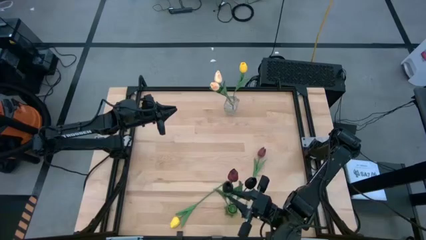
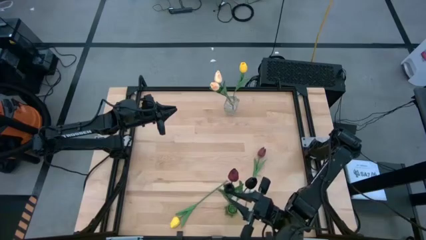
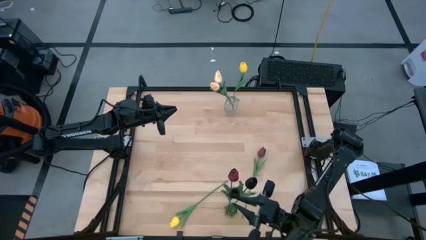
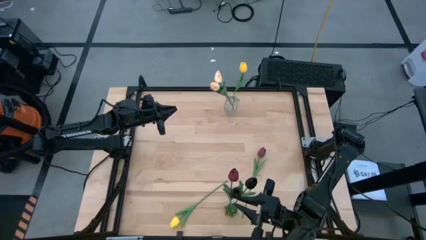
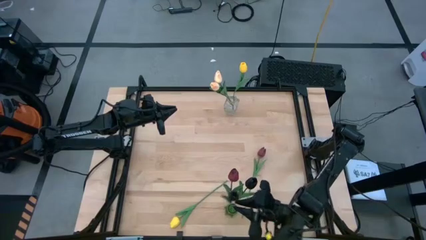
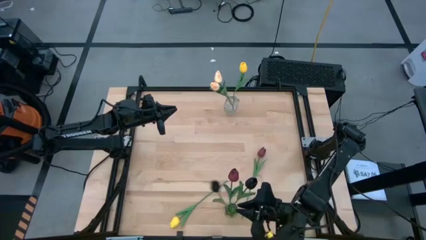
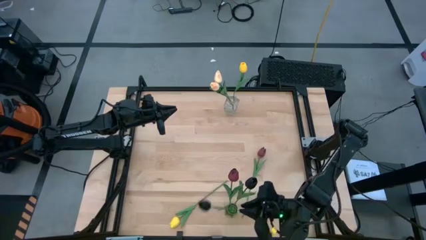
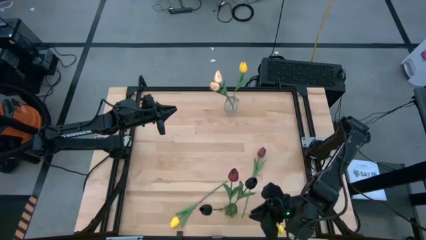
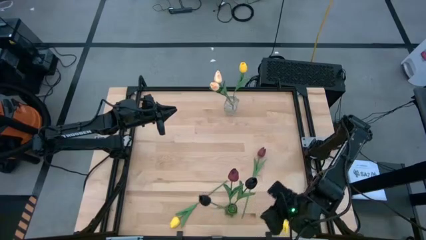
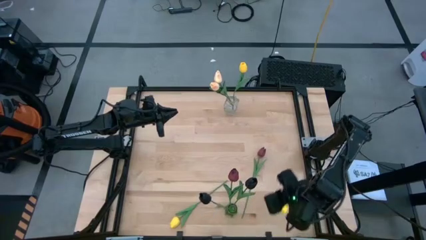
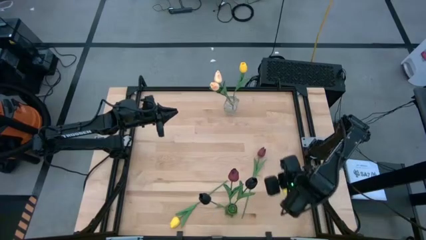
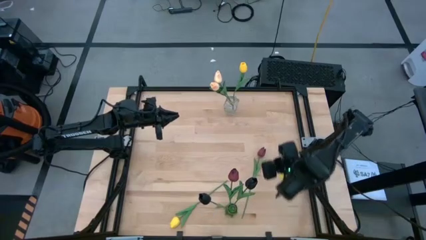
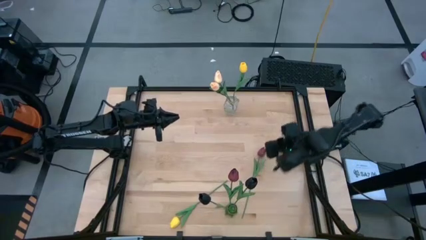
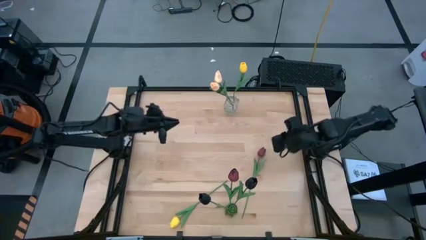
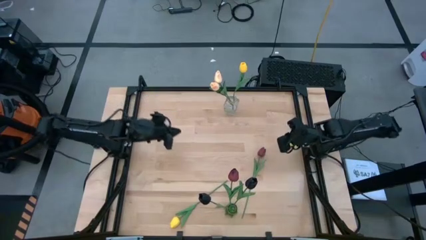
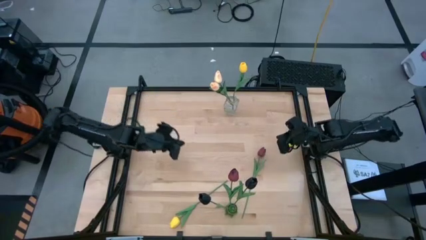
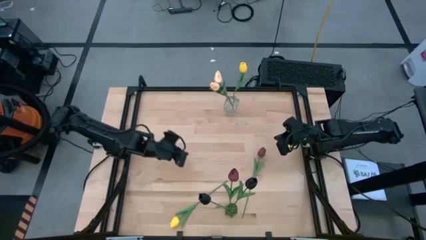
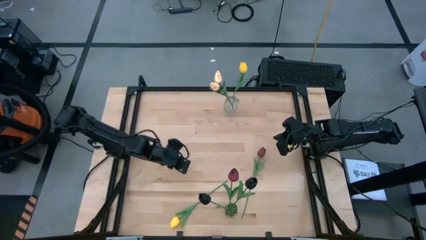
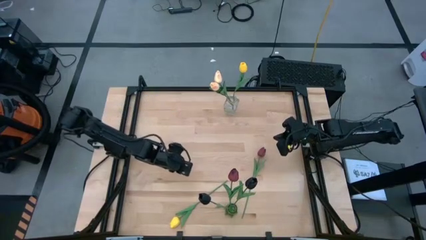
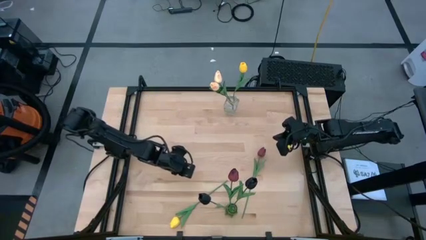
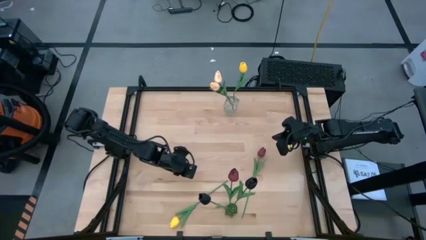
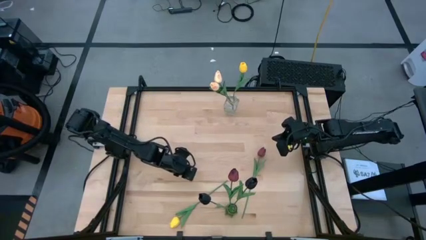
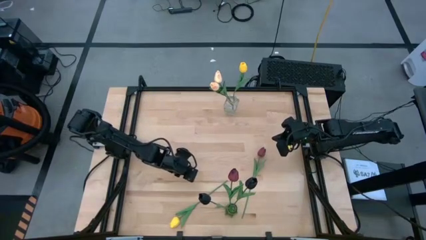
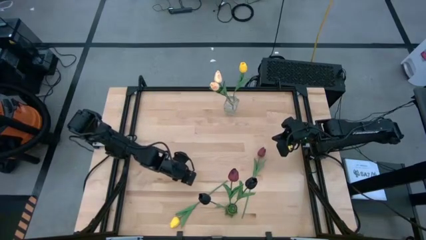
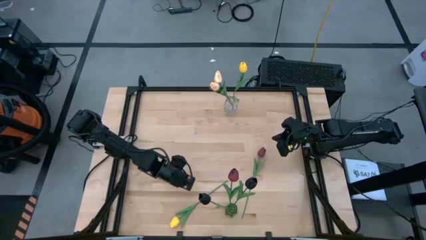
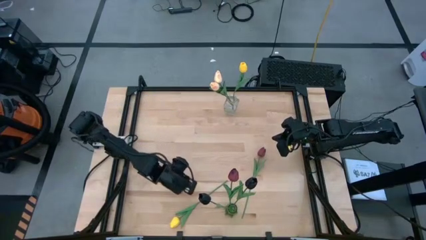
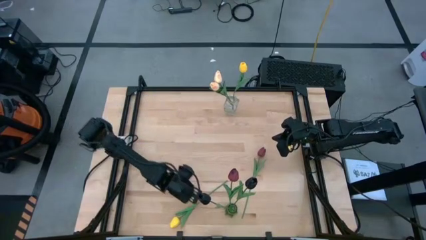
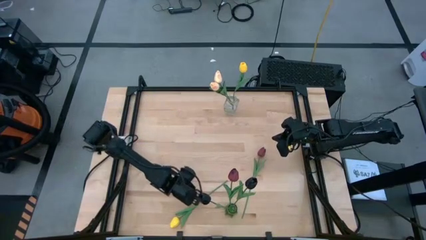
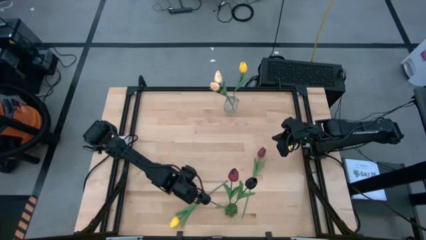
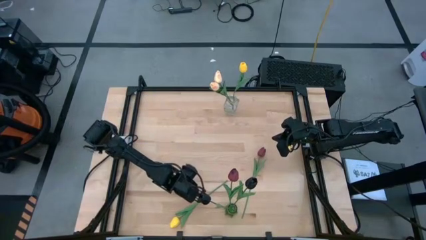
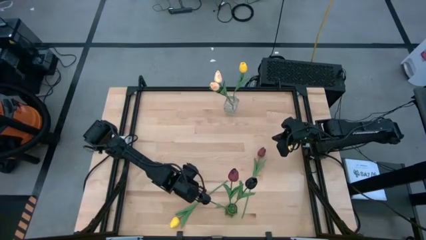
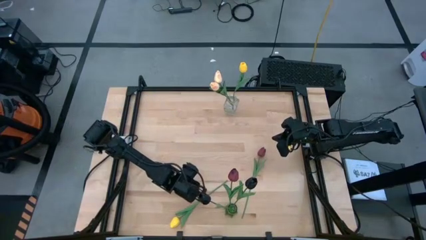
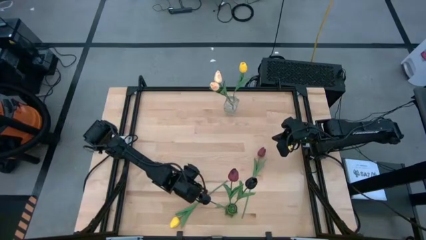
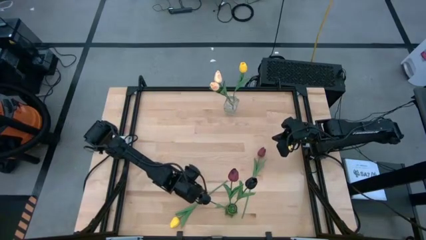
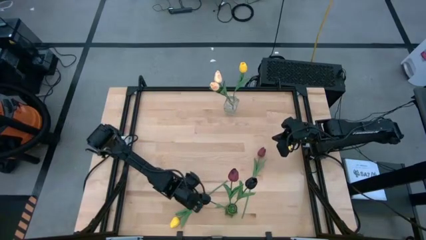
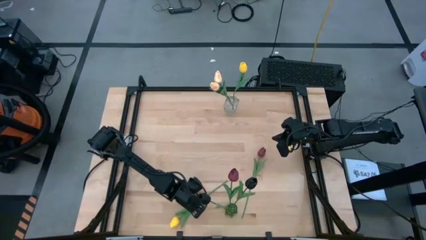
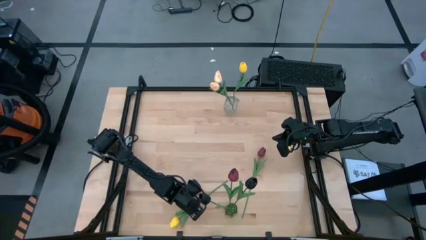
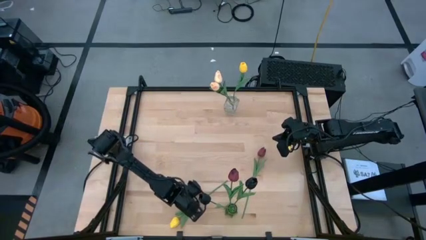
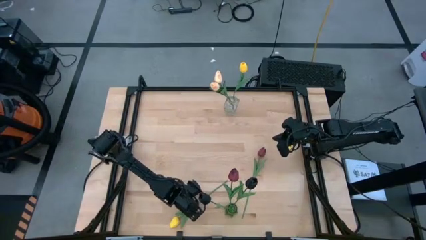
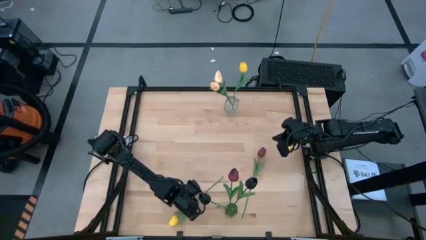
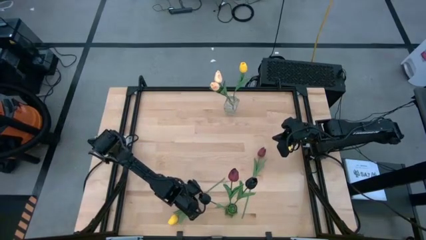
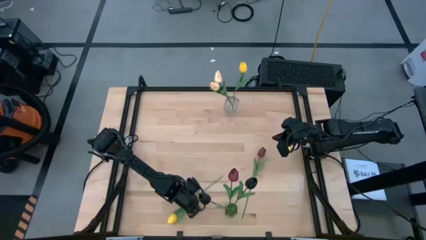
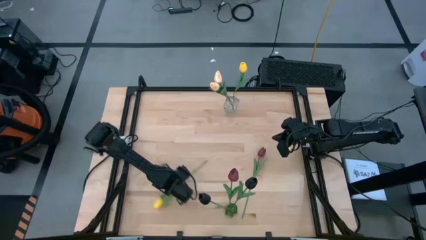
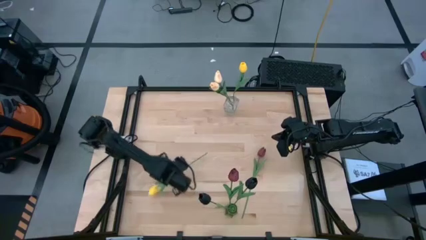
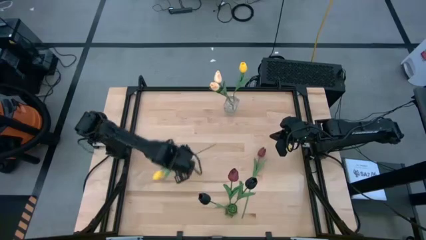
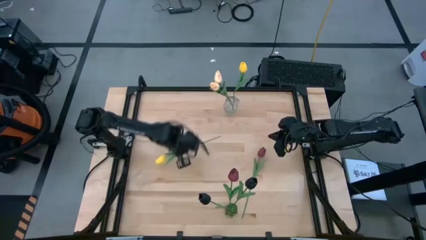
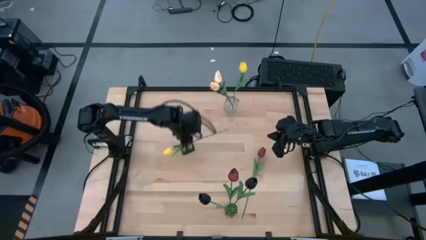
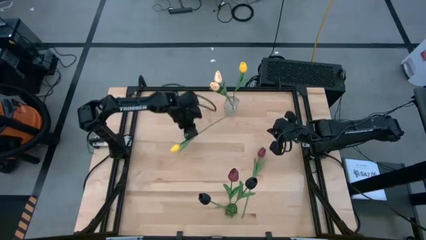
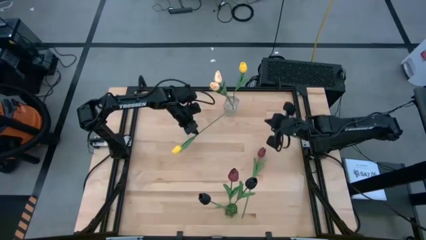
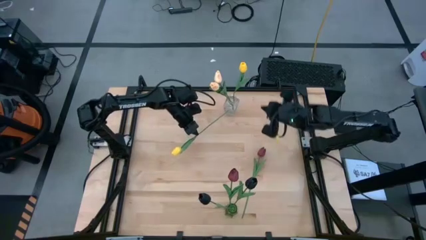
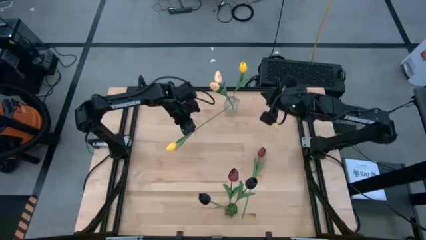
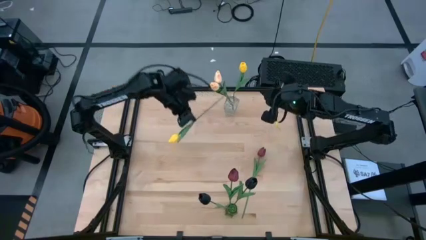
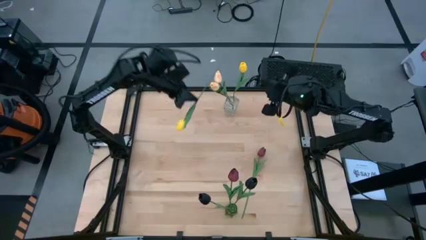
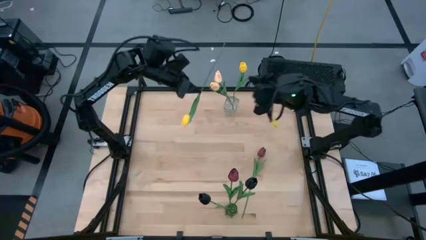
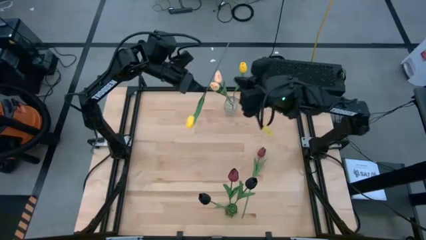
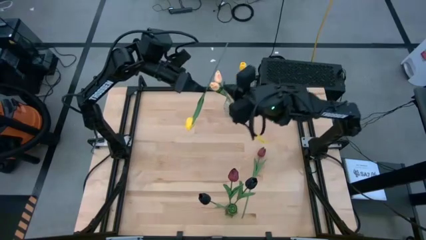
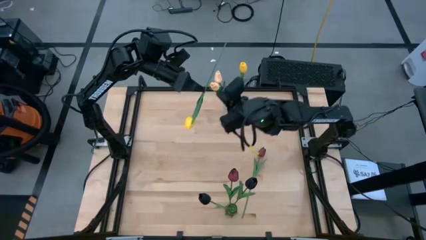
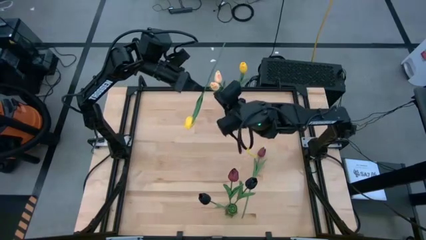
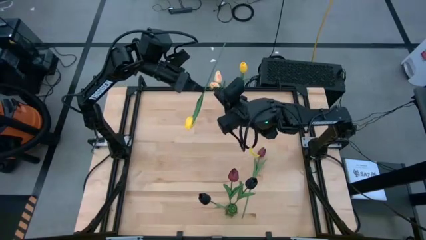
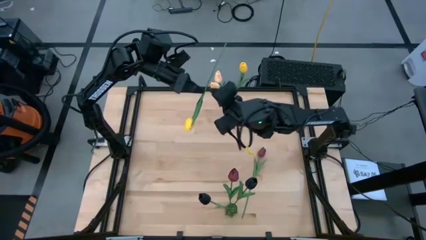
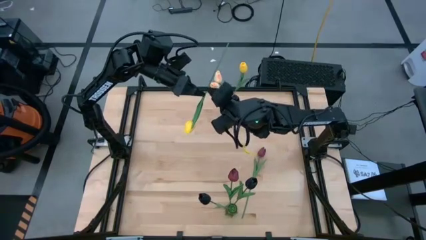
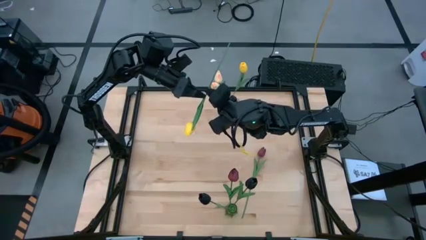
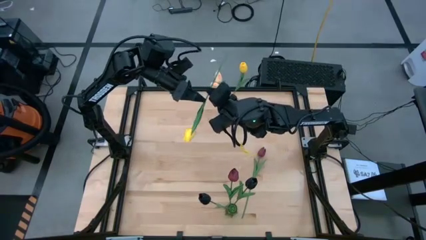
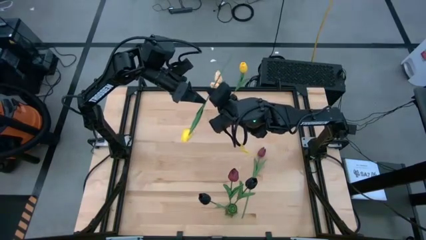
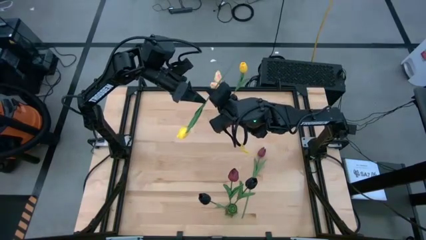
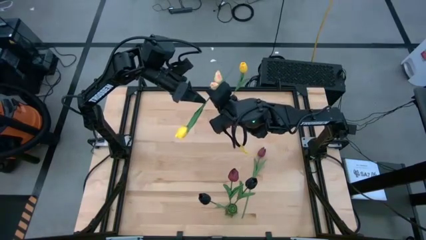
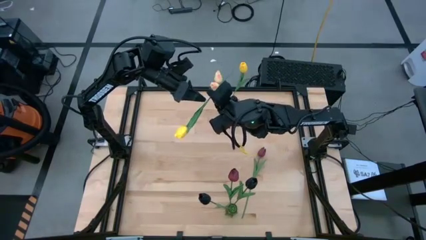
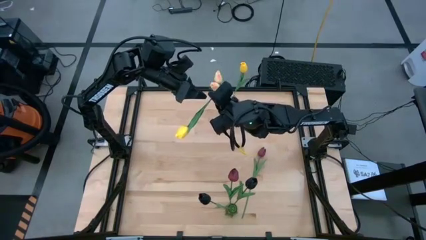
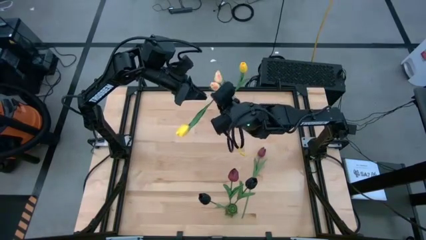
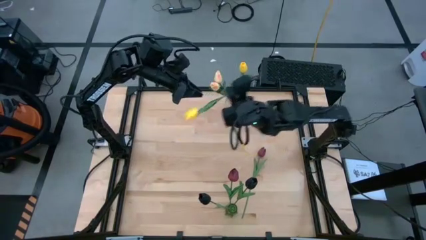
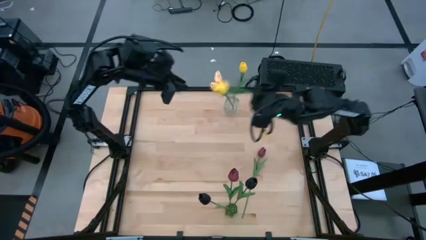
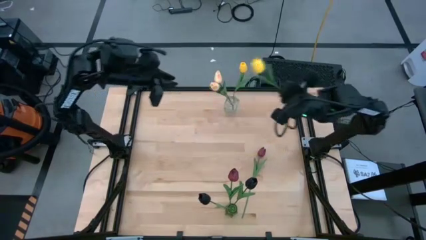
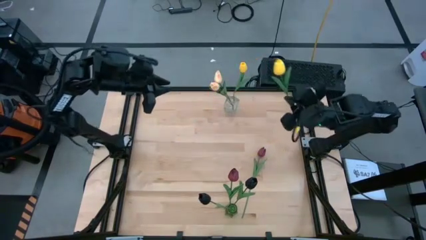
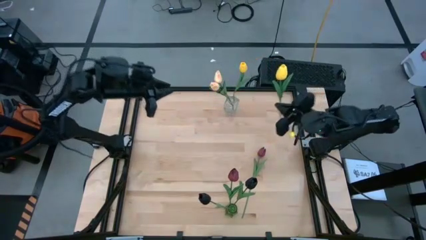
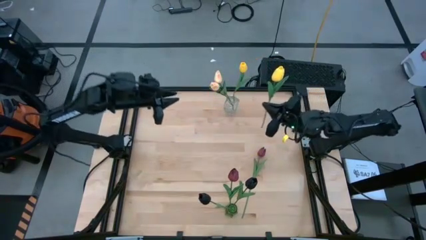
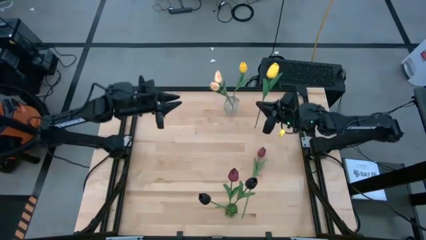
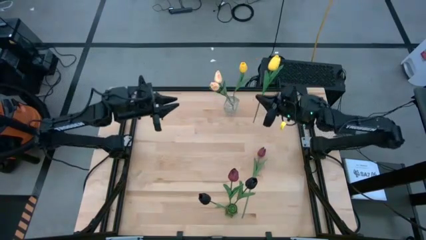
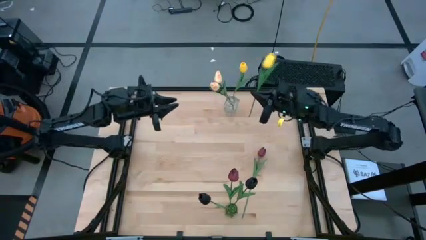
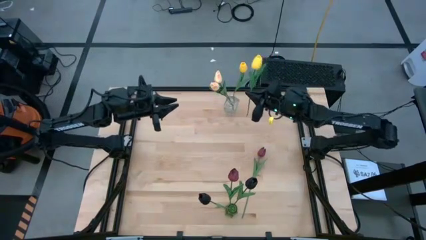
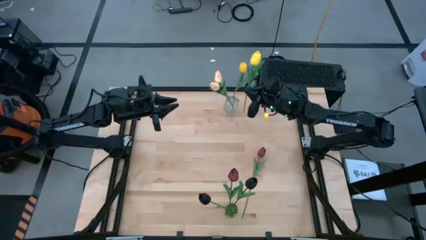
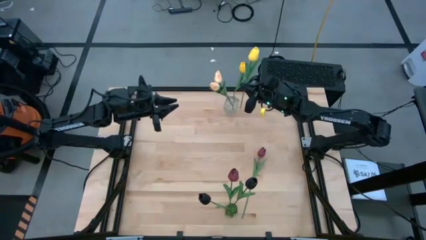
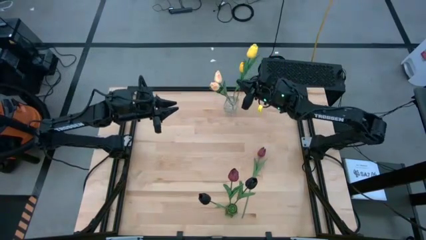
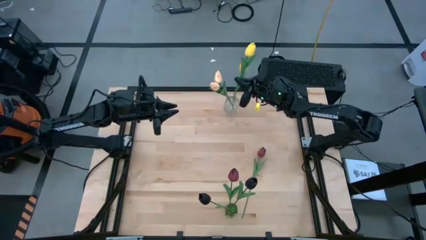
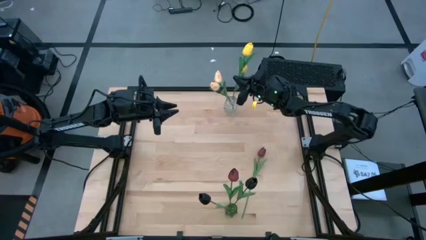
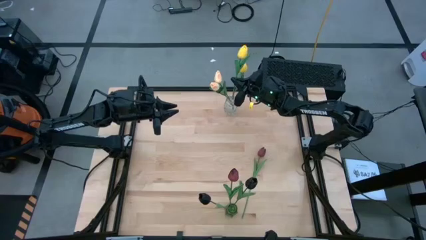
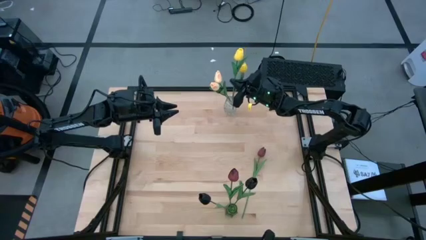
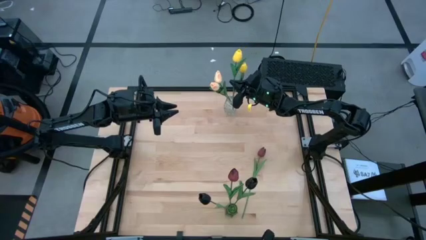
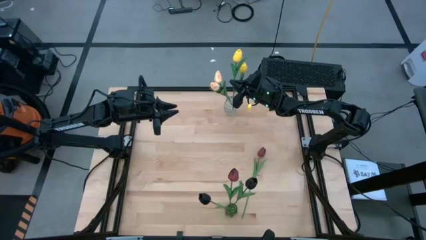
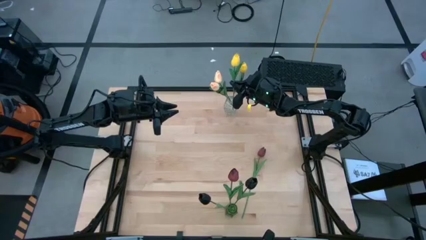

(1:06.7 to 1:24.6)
Task: Sort flowers into vase by color
Put the yellow tulip into the transparent flower vase
